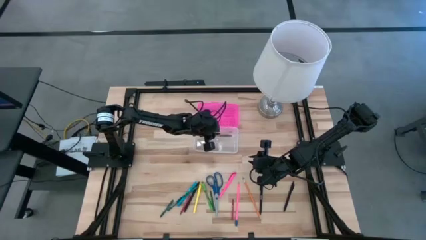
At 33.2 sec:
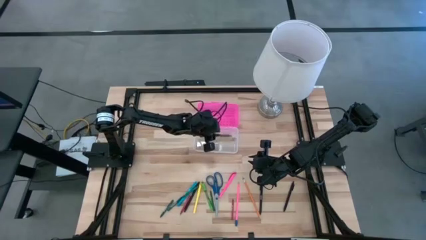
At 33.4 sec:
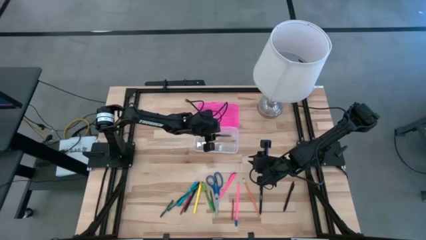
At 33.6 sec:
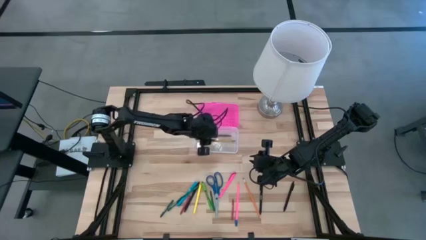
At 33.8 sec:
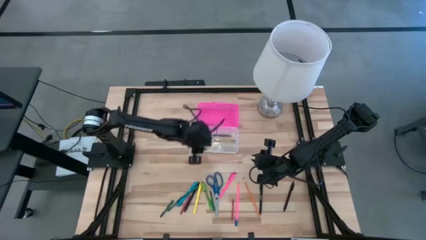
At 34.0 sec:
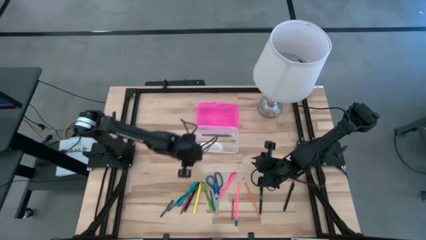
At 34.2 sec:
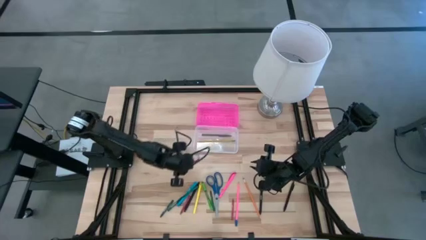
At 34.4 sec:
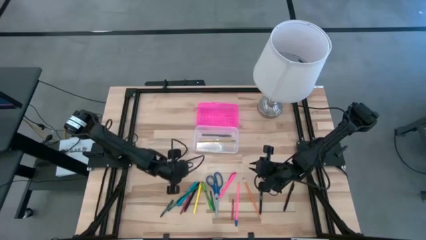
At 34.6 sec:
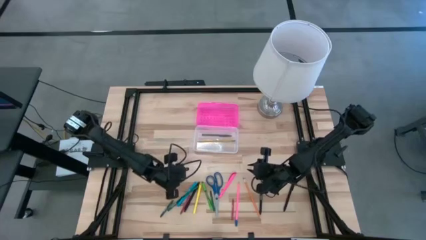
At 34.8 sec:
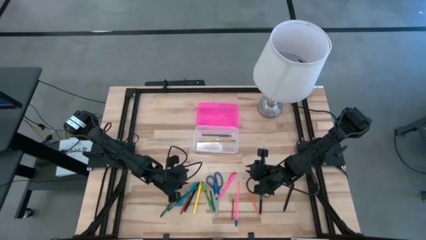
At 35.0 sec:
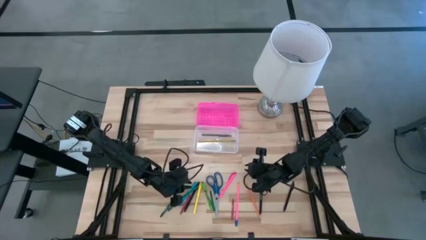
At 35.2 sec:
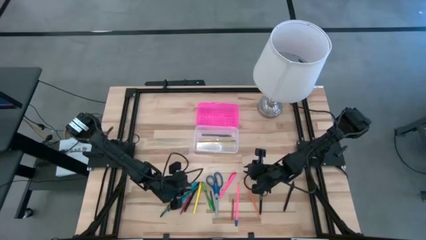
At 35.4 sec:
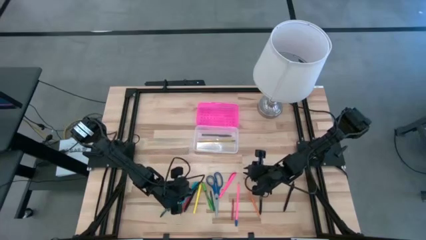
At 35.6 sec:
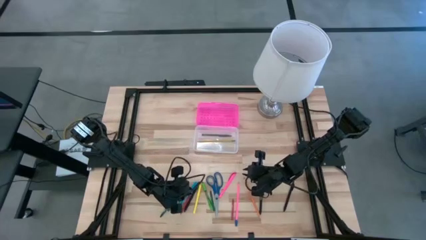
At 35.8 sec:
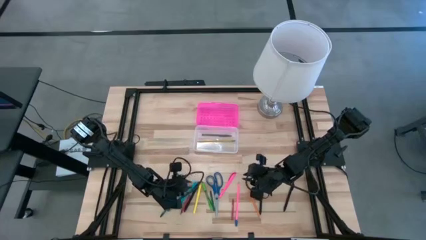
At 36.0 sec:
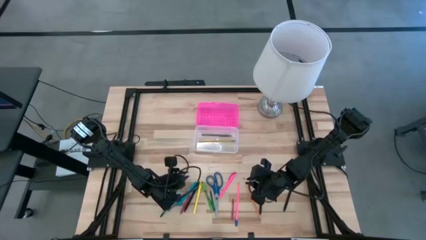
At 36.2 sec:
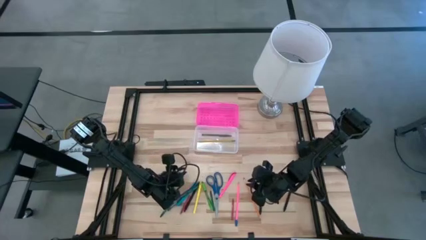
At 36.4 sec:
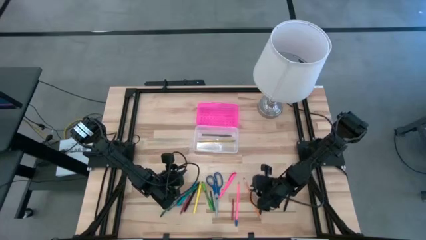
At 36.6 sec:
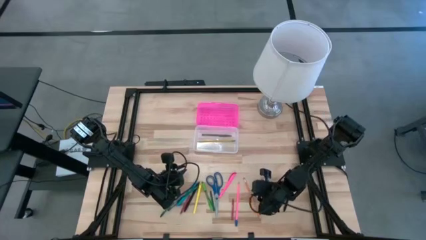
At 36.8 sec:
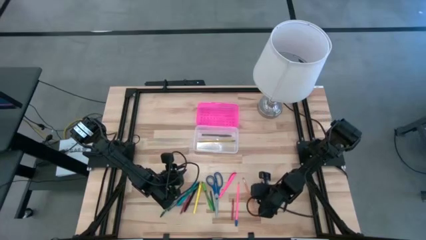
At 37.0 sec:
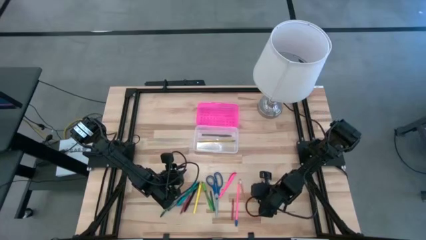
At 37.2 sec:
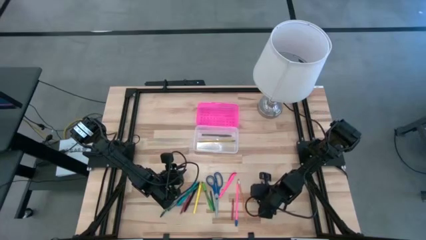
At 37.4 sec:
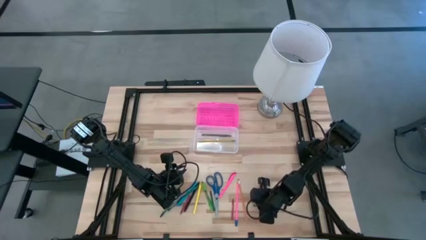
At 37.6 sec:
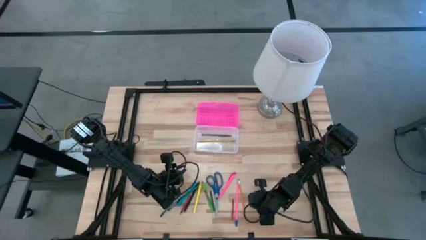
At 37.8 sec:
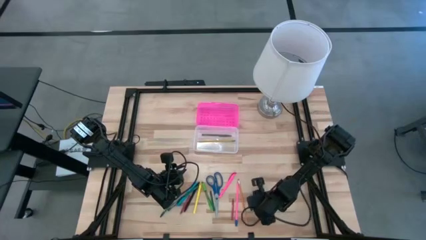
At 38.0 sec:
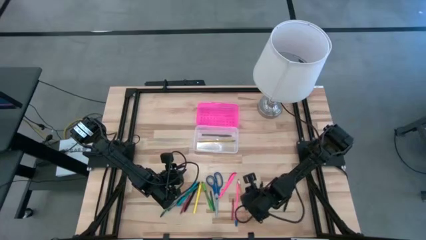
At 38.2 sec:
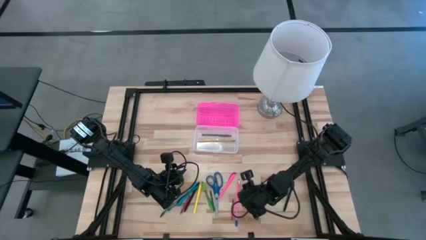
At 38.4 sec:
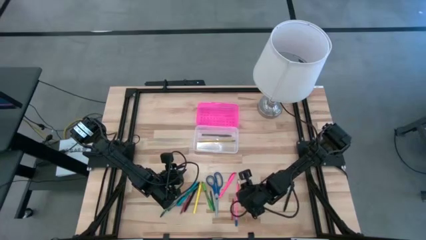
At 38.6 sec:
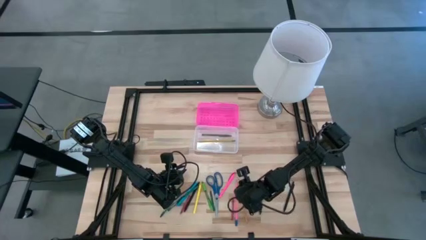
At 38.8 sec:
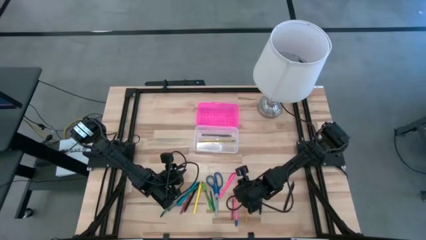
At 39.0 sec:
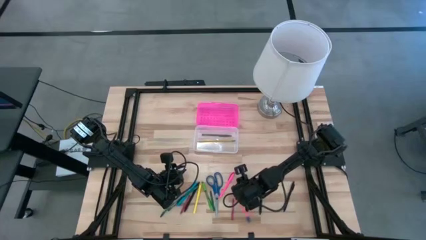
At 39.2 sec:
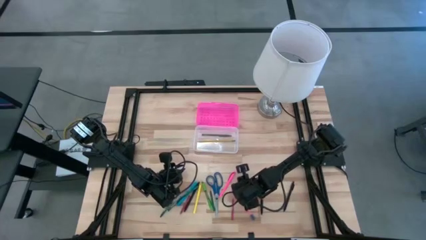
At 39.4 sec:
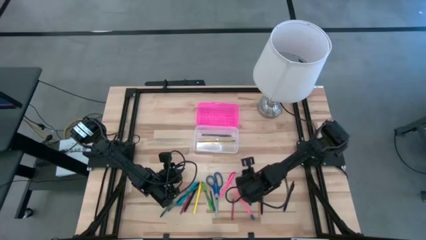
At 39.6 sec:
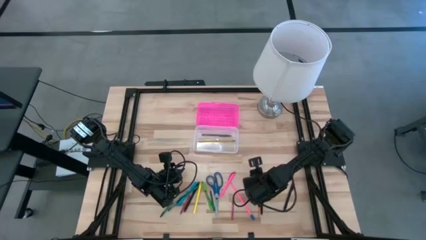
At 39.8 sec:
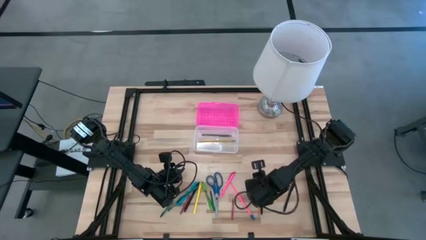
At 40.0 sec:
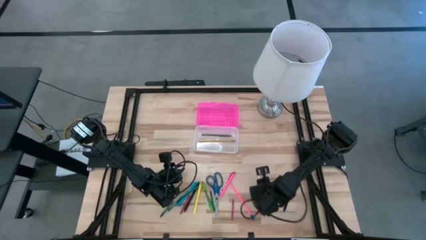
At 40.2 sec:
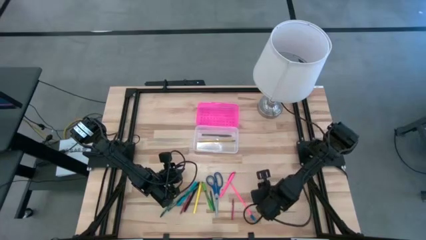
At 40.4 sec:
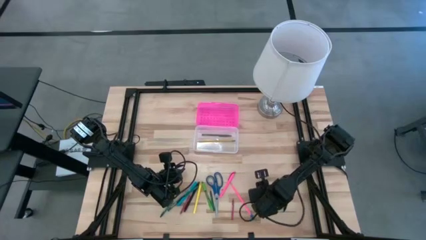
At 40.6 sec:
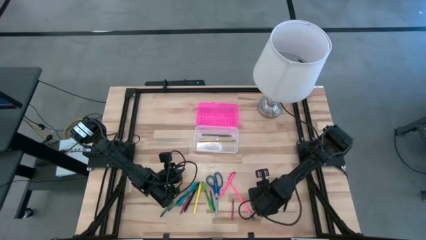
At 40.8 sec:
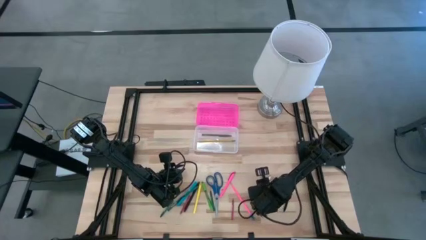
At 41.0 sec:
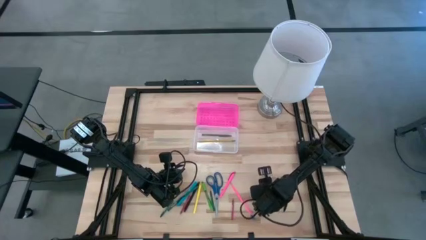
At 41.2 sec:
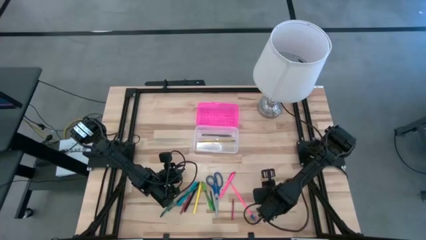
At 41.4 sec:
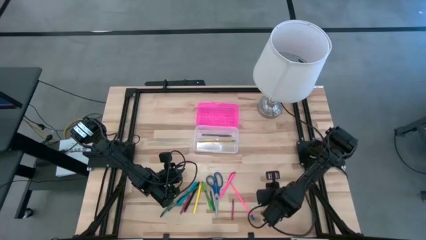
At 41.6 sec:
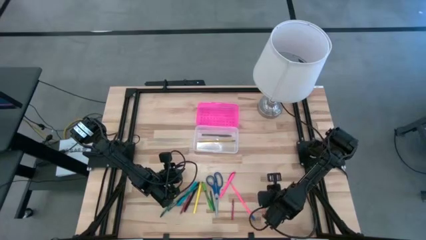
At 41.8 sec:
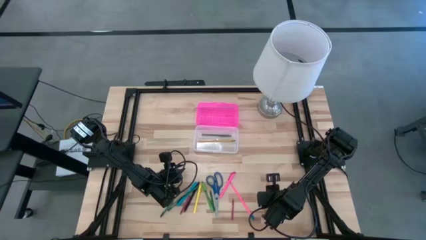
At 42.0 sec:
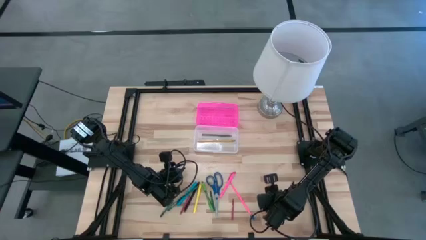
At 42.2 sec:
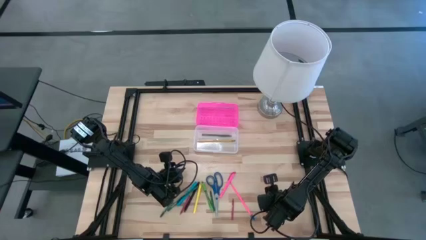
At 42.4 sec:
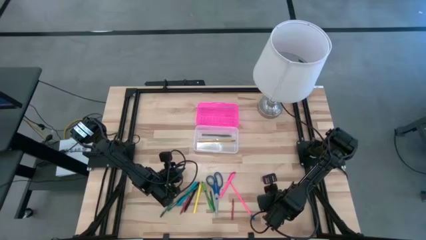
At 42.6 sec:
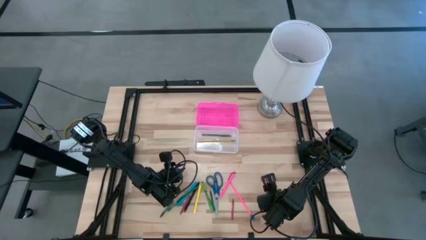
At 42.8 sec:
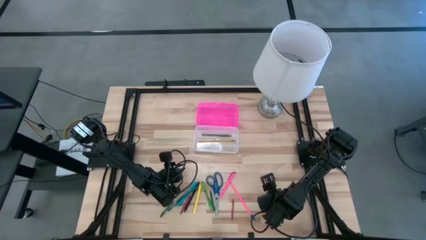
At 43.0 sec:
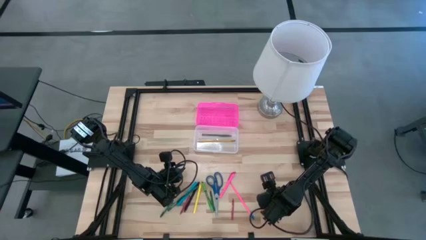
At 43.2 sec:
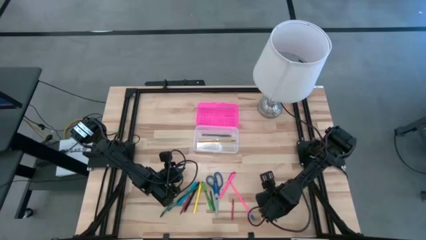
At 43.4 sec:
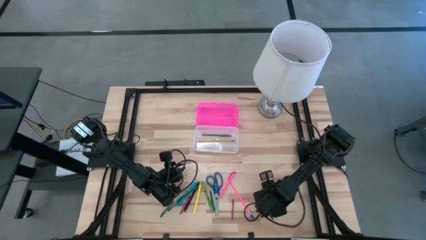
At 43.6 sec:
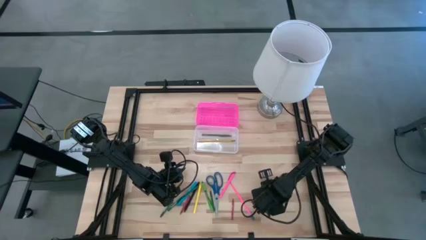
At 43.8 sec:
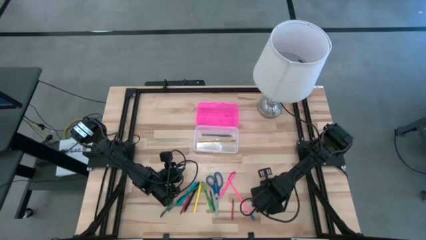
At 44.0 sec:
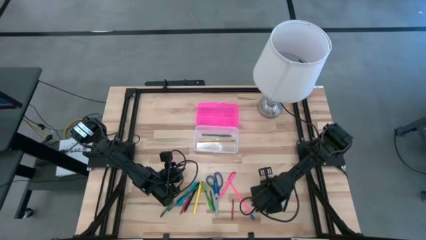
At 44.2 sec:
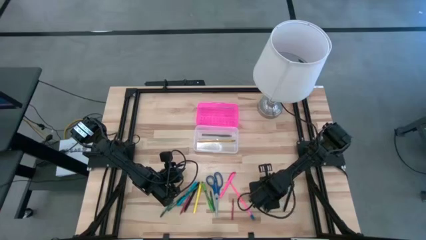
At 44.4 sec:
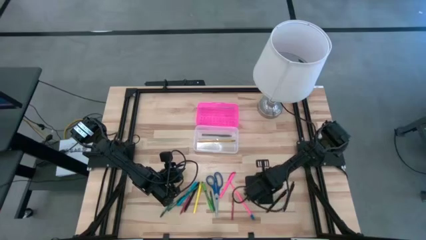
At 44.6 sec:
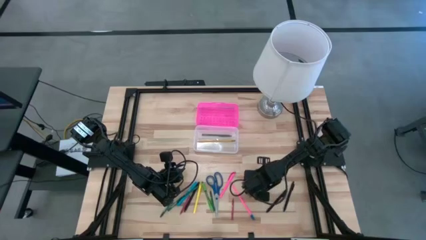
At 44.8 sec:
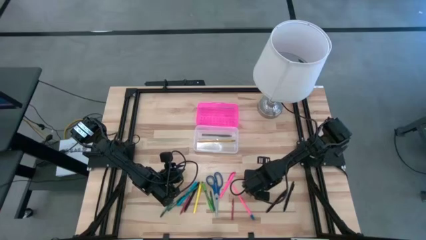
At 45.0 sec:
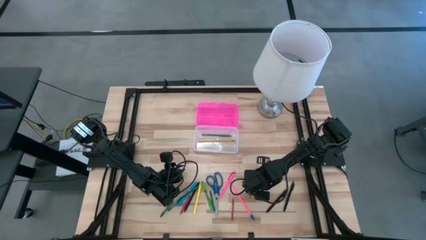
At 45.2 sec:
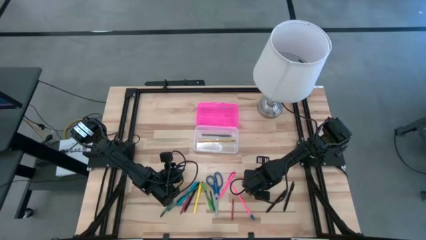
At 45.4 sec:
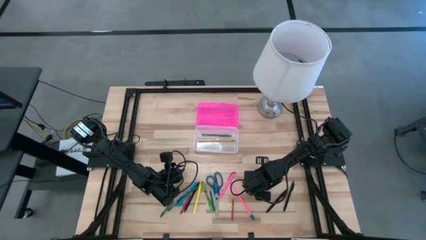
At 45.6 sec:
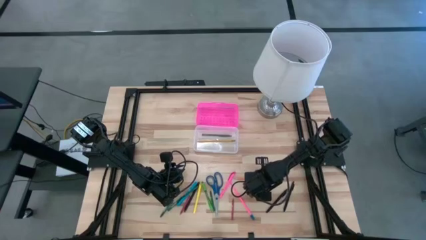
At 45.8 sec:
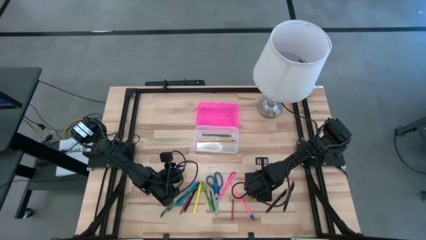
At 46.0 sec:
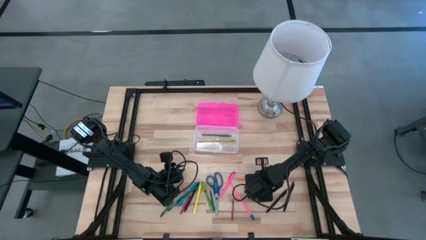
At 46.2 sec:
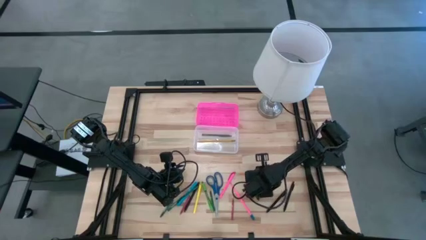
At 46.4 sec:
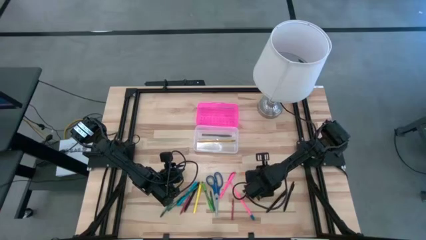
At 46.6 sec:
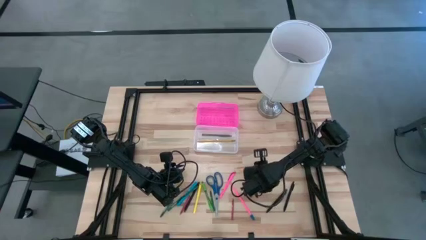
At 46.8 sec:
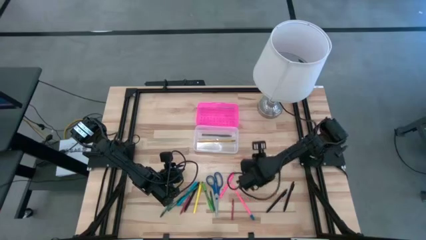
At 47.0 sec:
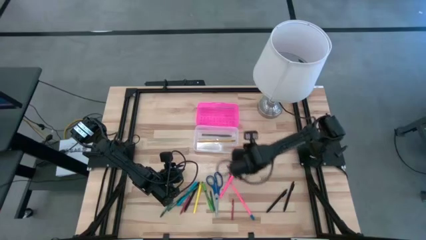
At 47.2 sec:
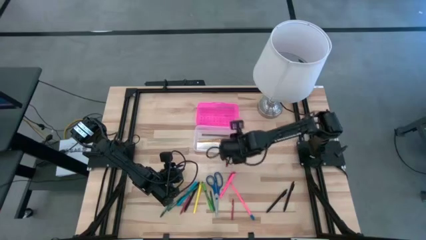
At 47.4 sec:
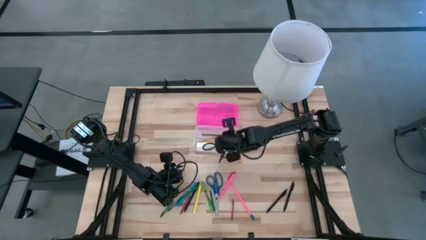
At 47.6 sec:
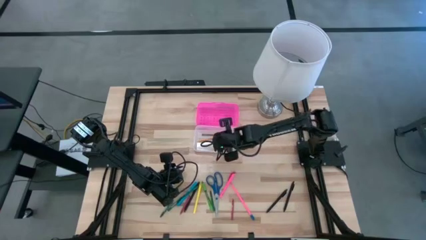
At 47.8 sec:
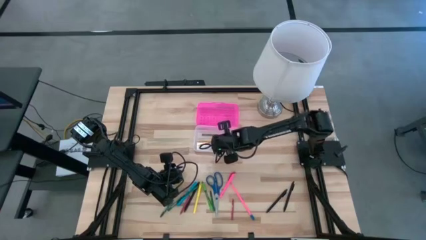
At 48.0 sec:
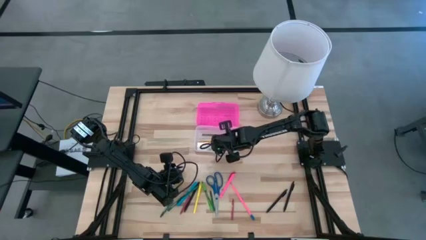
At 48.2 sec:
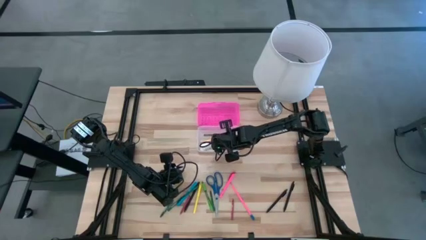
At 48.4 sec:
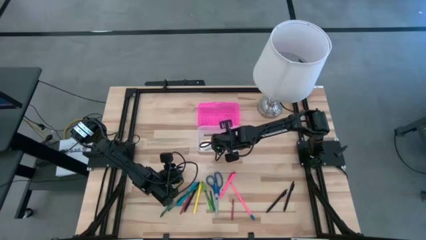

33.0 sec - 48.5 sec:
Task: Pick & place school supplies into a supply box
Put the orange pencil into the supply box
